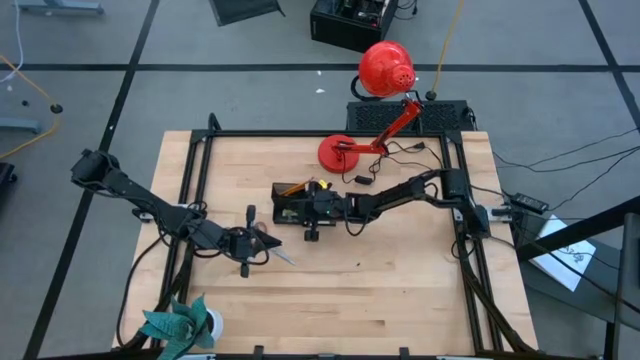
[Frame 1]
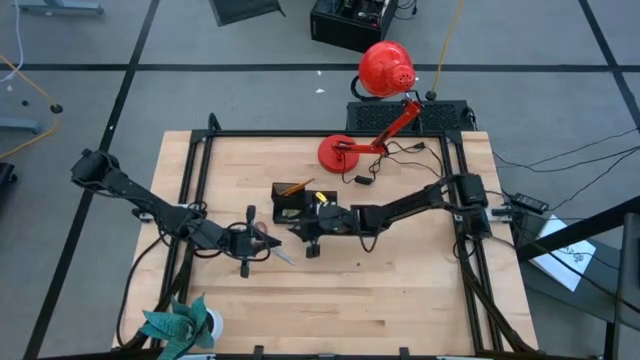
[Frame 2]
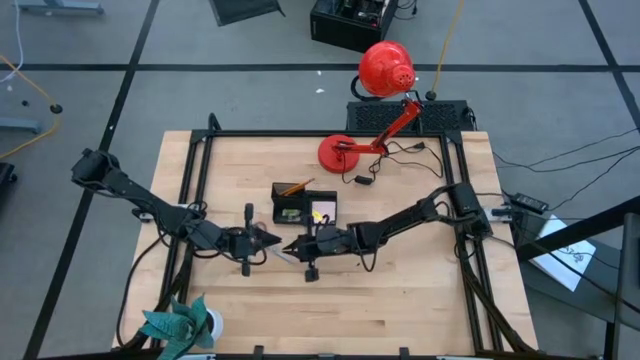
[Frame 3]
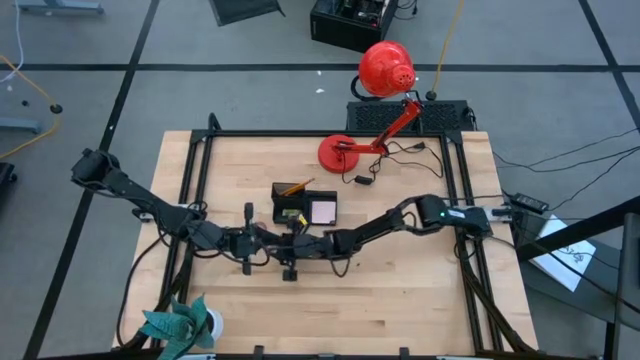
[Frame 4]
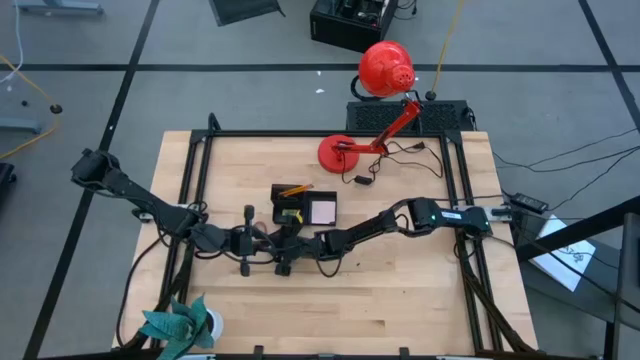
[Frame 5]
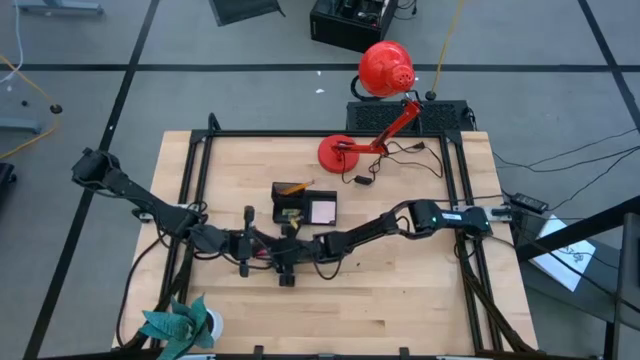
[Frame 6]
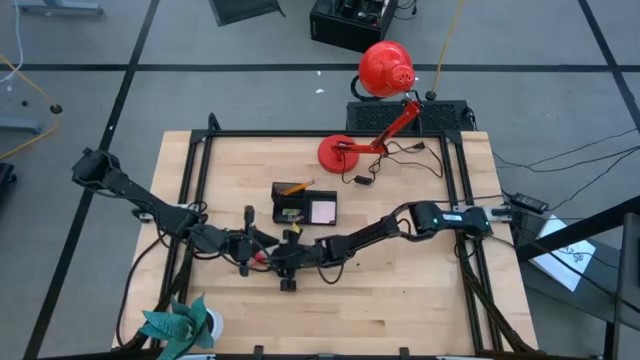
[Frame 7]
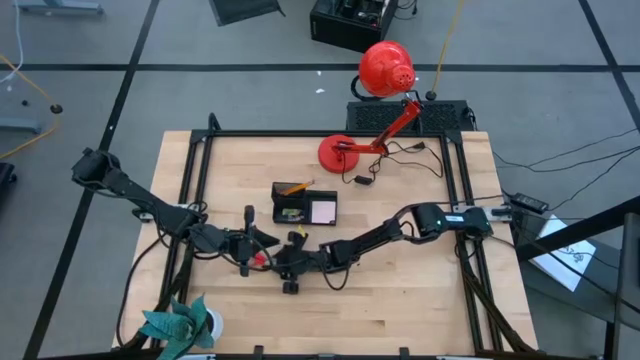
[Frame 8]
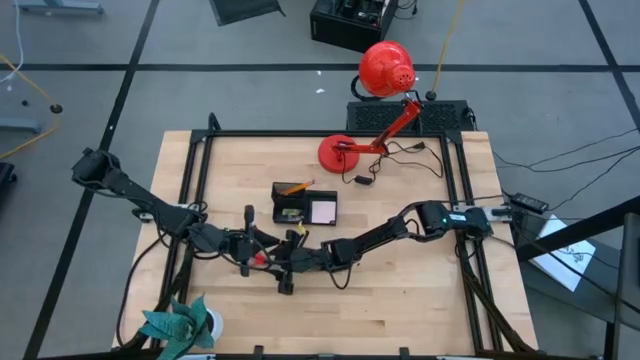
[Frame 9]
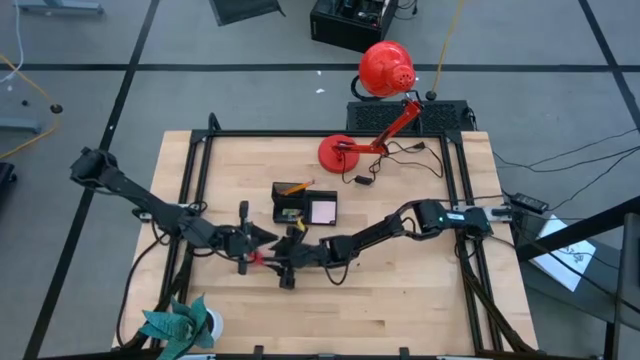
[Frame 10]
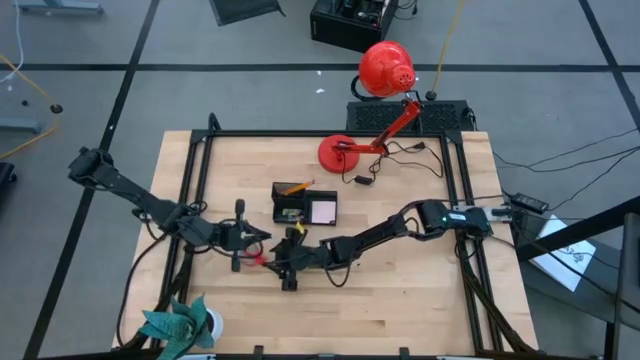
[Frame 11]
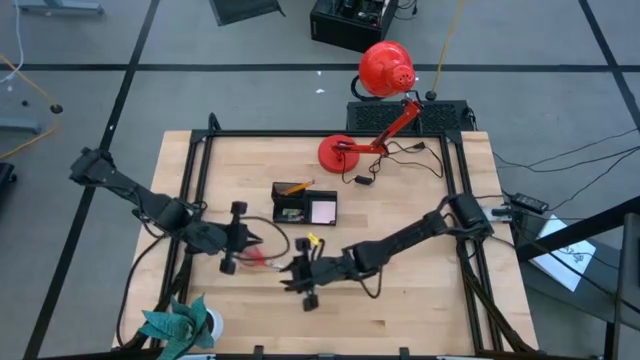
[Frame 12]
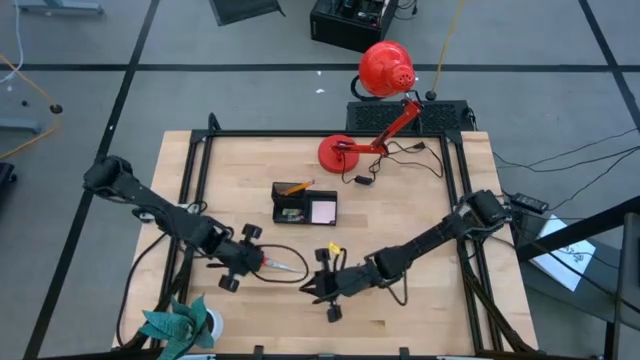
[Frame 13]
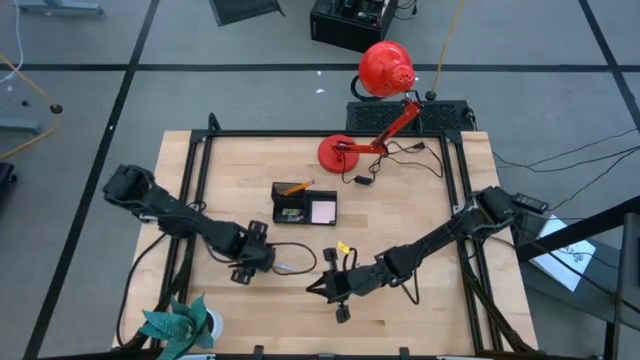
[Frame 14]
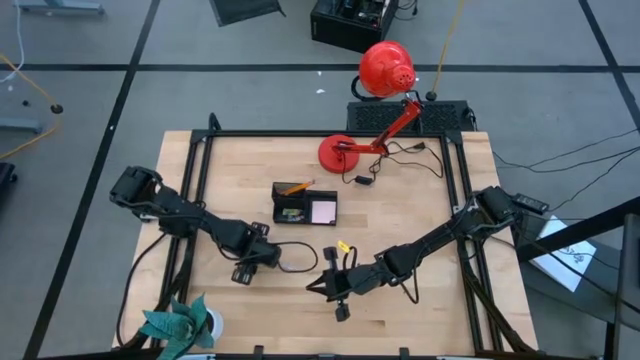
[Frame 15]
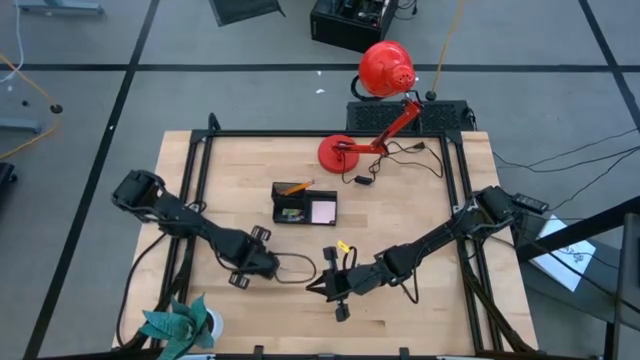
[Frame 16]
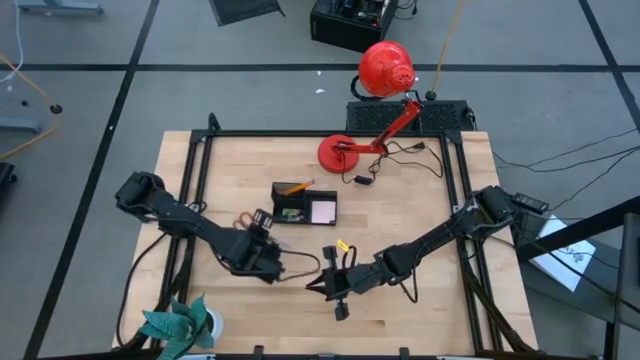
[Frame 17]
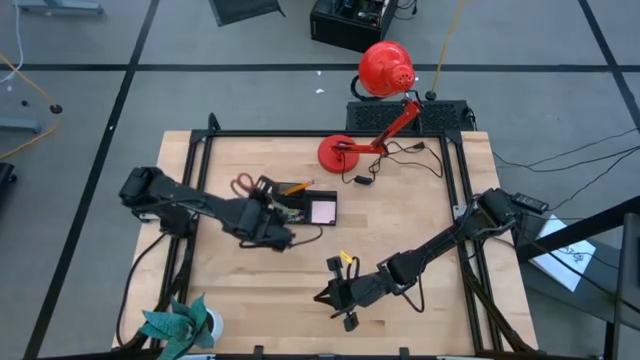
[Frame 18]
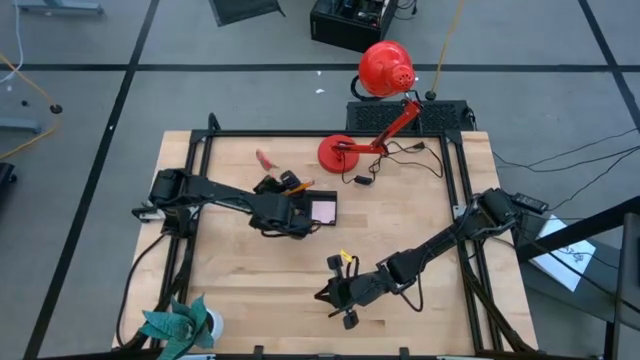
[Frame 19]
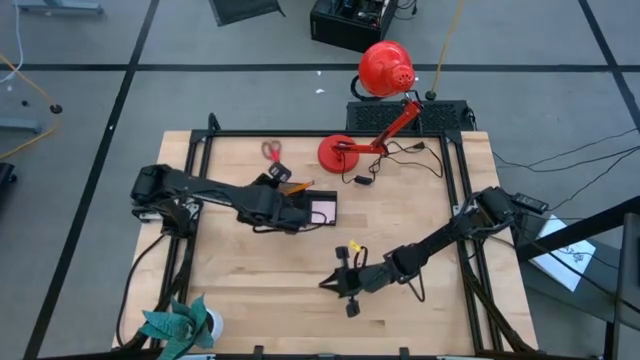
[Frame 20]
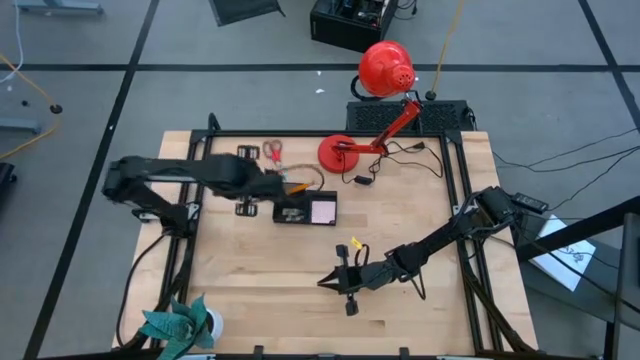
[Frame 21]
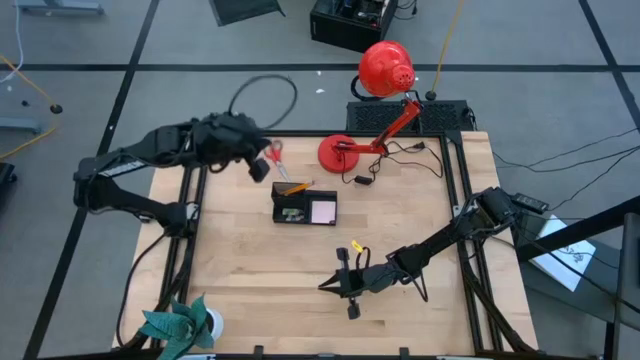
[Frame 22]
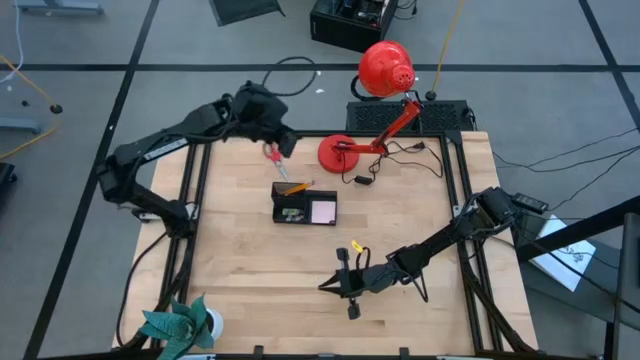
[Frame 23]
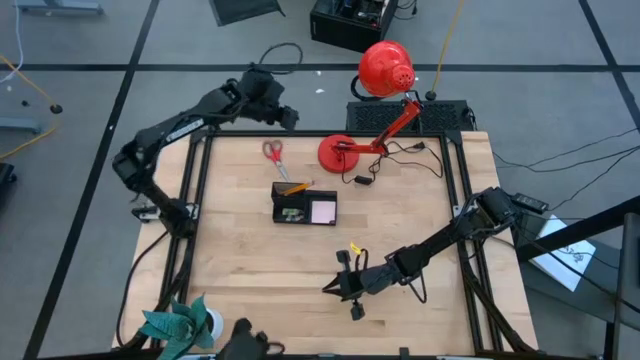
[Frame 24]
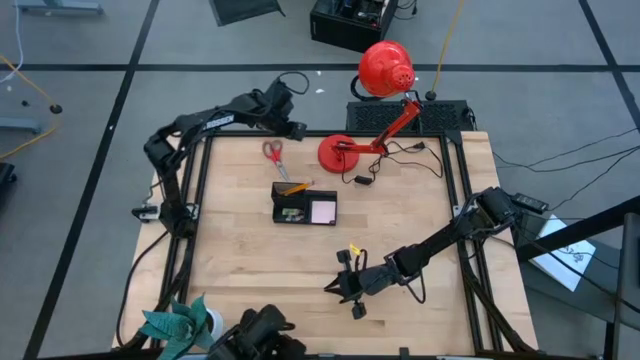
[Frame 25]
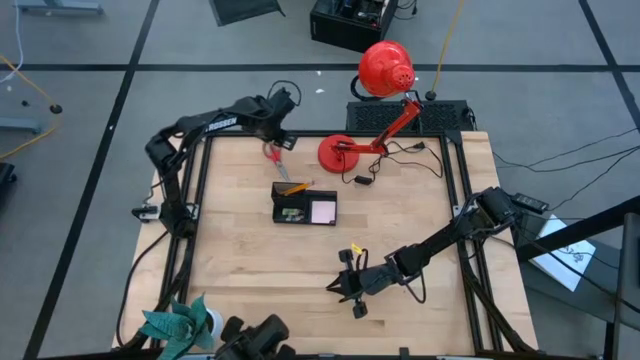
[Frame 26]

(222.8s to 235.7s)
Task: Pick and place office supplies into organizer
Put the red scissor into the mesh desk organizer

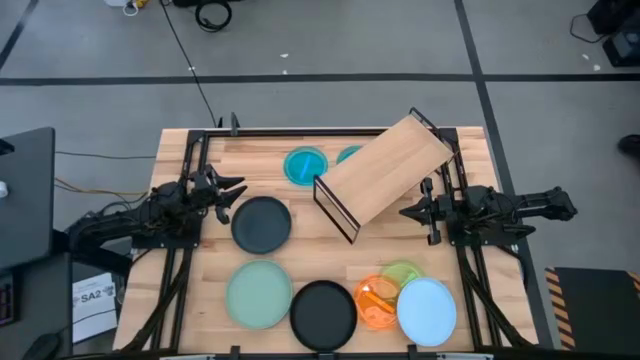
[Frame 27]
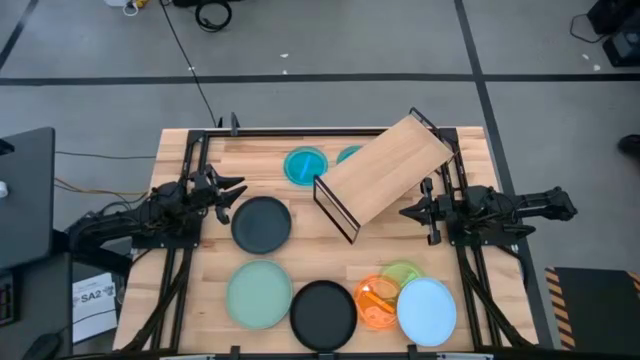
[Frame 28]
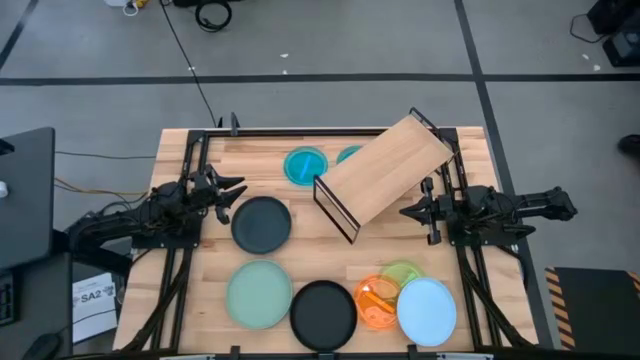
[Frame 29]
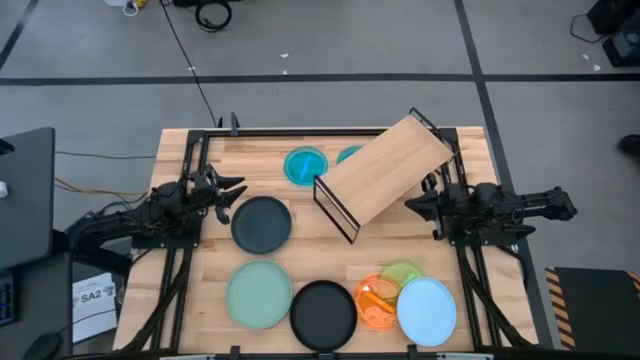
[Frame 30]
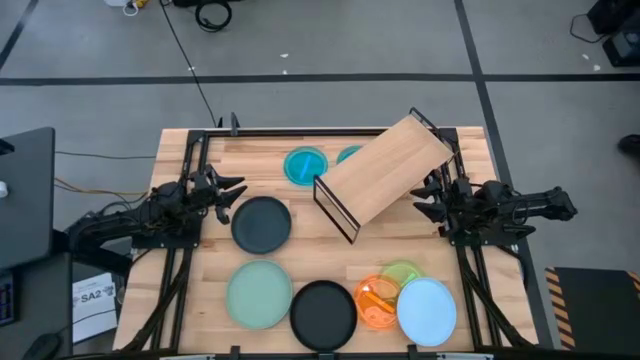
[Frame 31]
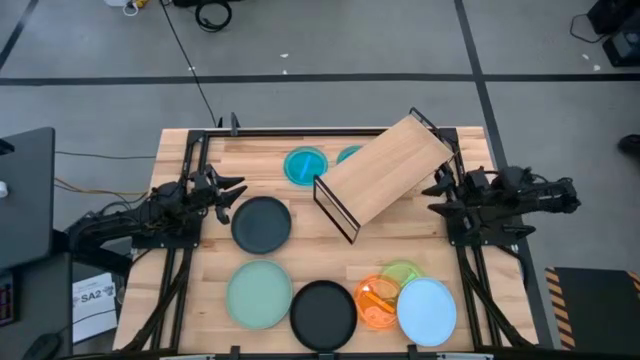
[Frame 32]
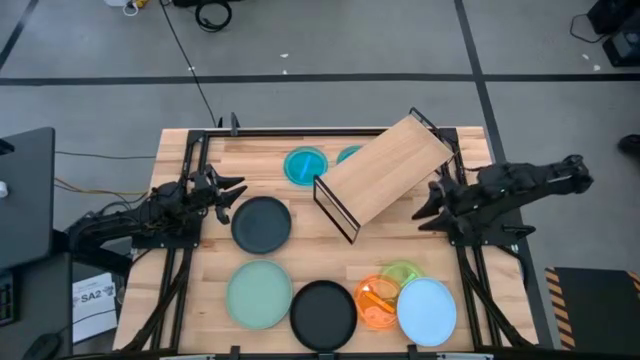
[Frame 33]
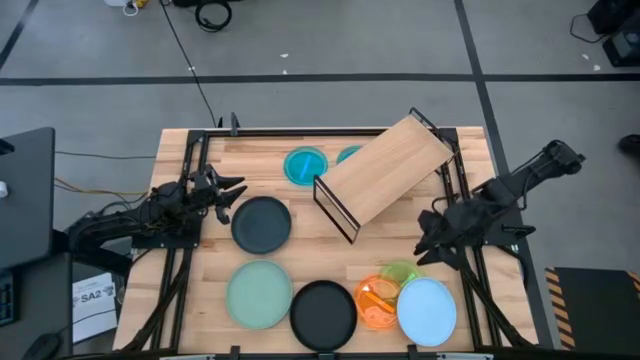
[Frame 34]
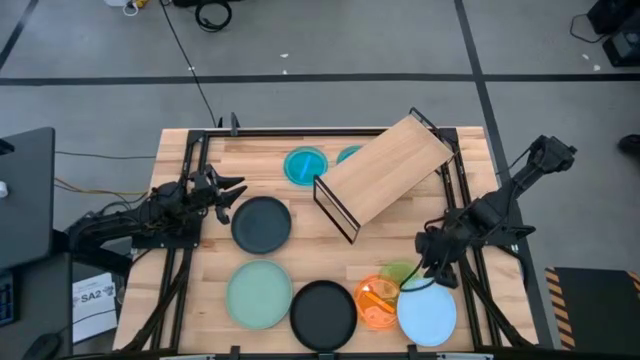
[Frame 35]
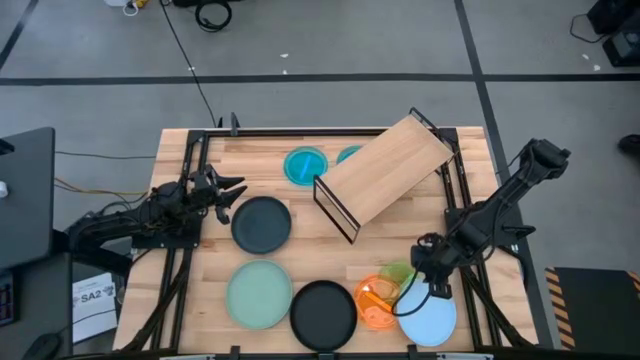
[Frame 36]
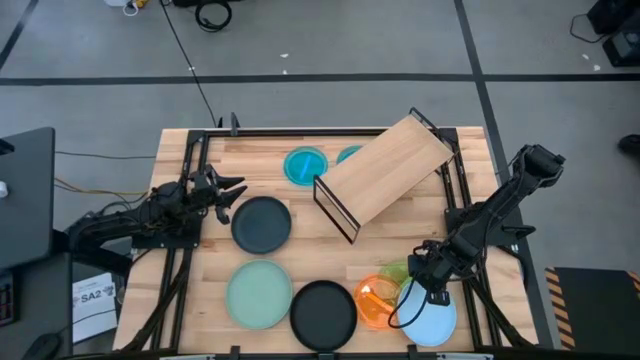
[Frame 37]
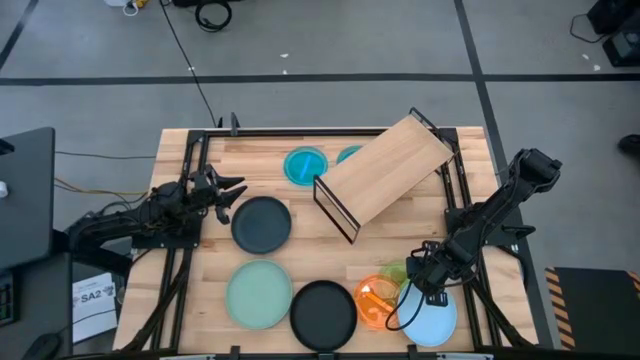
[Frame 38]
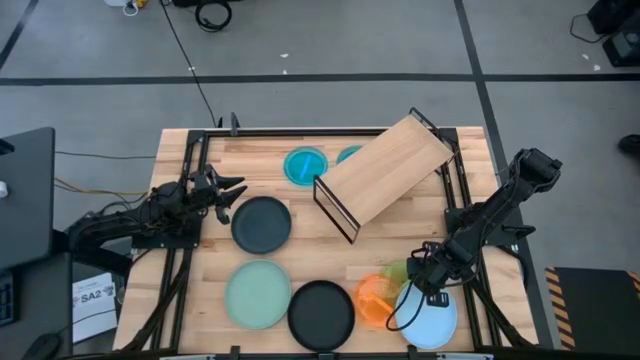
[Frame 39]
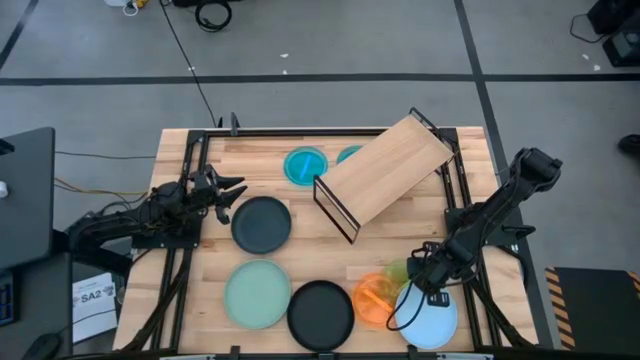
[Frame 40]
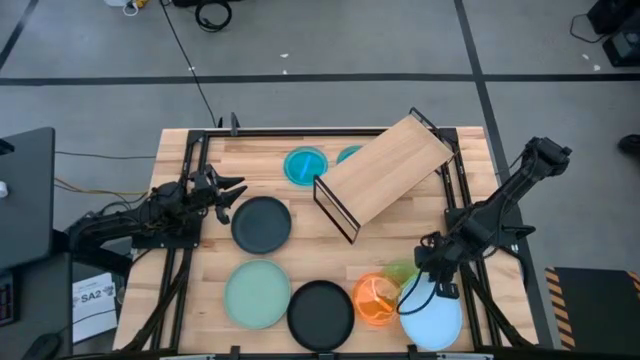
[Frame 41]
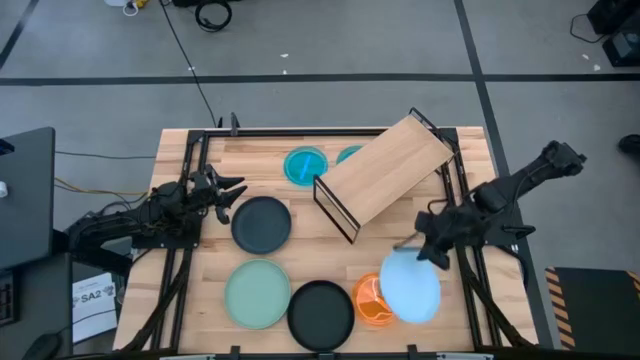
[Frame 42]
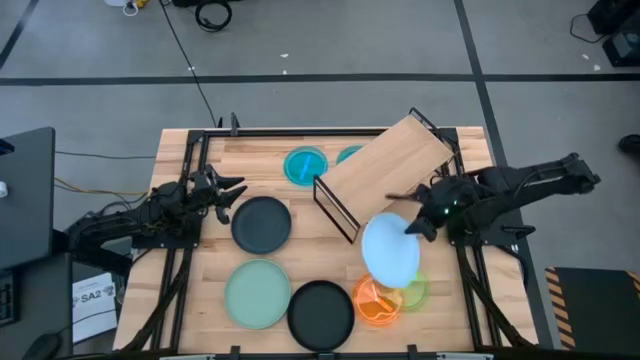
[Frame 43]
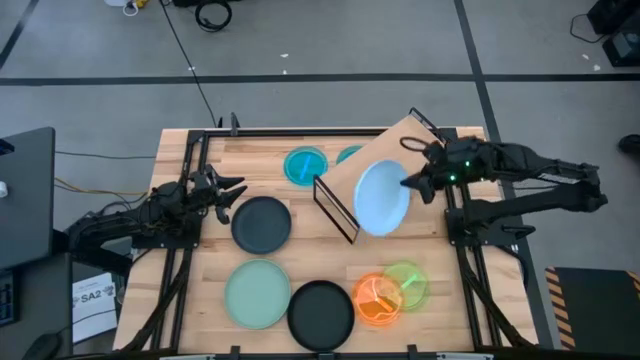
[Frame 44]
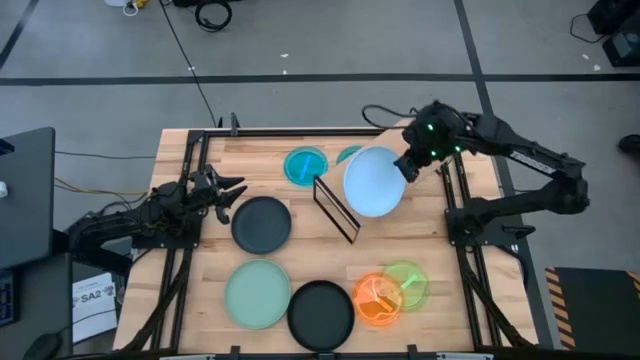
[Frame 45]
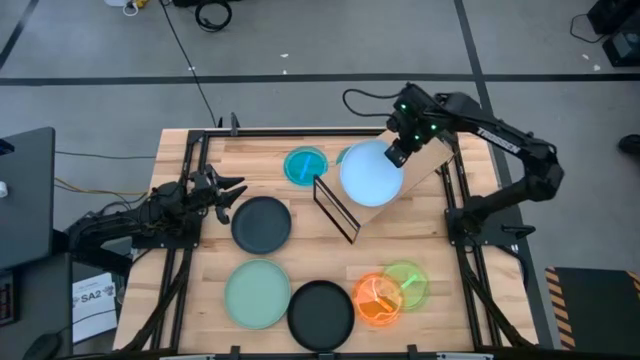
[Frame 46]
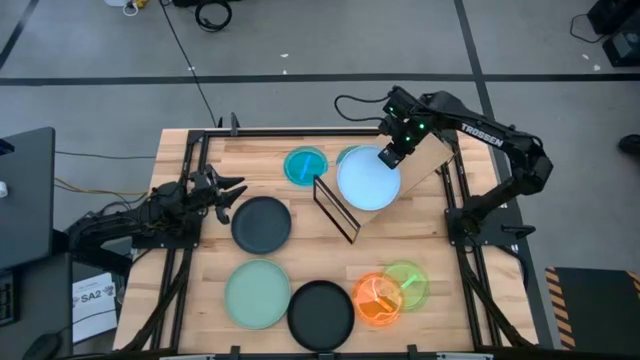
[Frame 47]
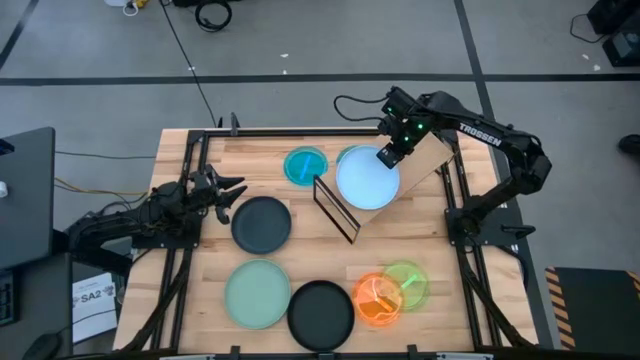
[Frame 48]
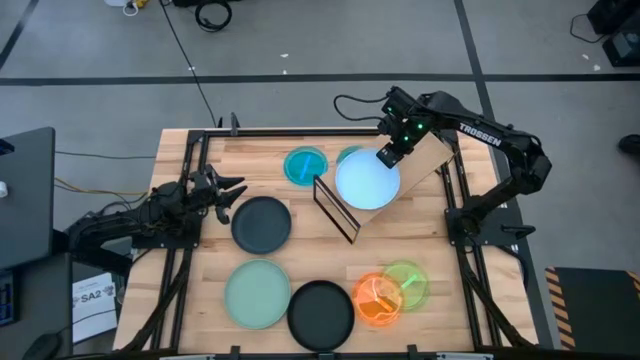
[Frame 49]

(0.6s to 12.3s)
Task: Place and stack plates onto a shelf
Put the big light blue plate on the shelf
